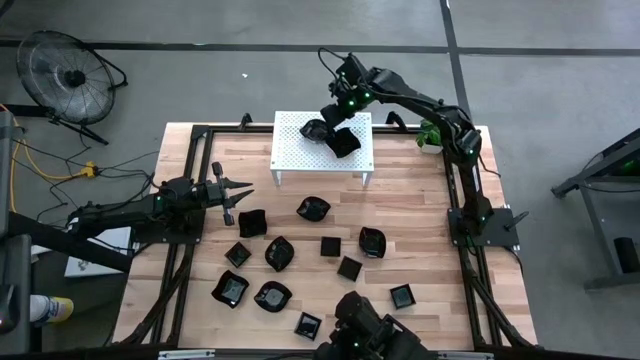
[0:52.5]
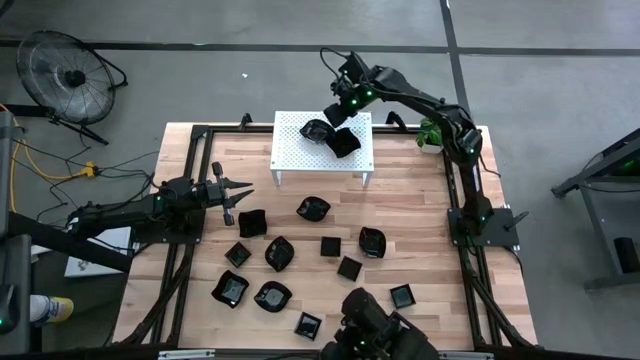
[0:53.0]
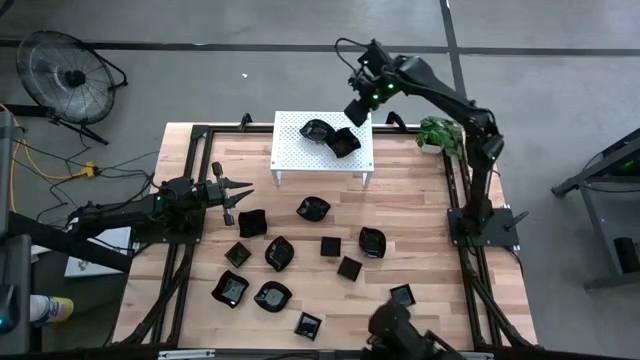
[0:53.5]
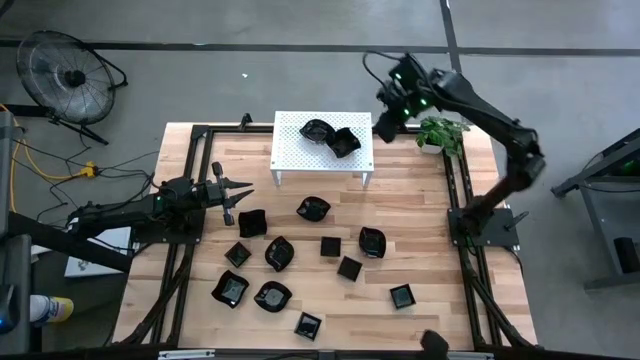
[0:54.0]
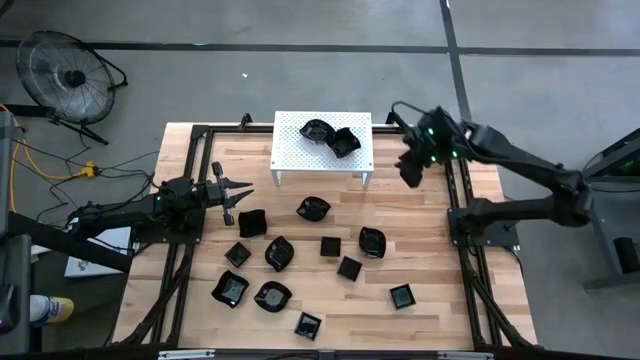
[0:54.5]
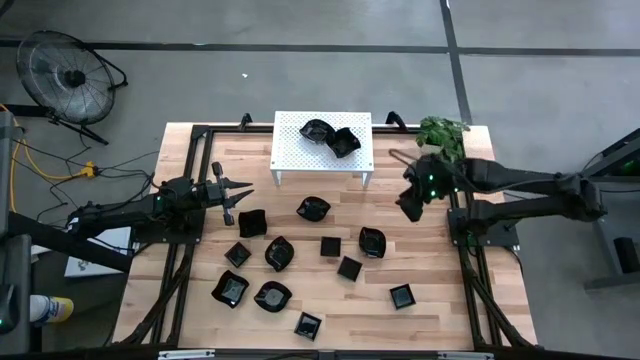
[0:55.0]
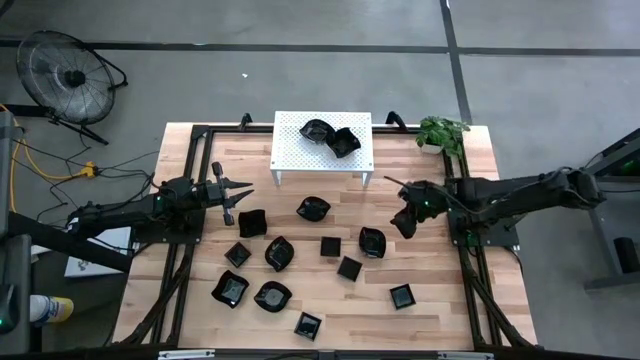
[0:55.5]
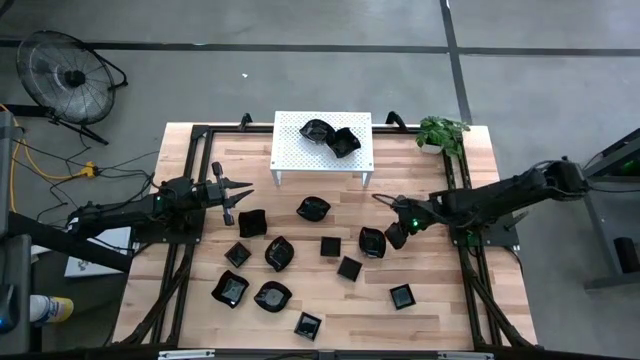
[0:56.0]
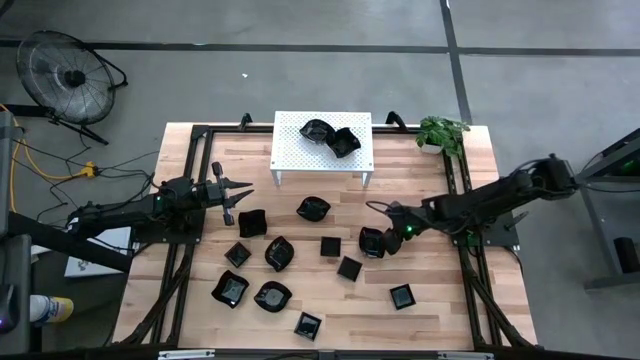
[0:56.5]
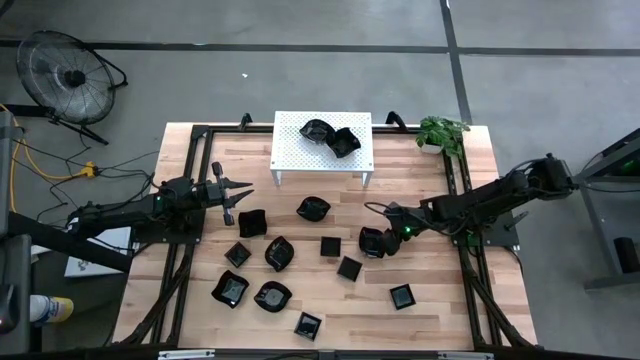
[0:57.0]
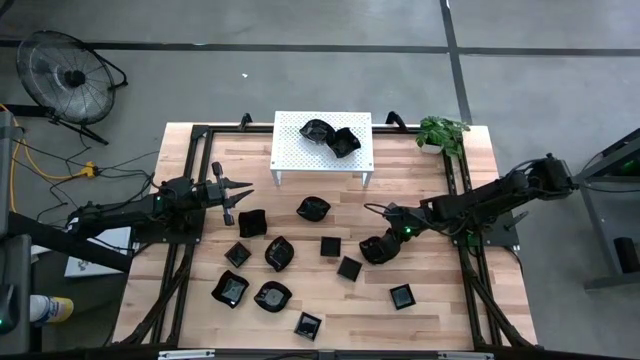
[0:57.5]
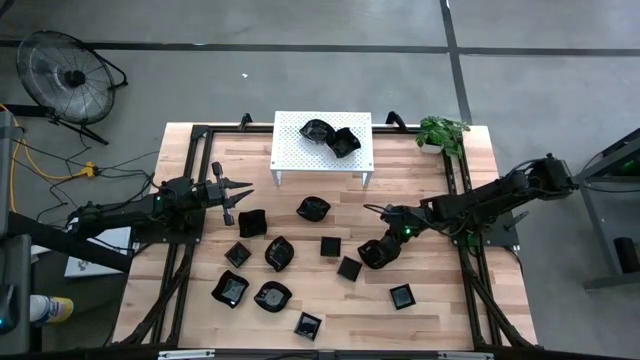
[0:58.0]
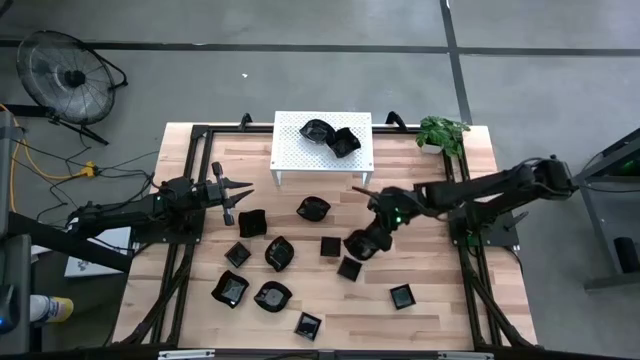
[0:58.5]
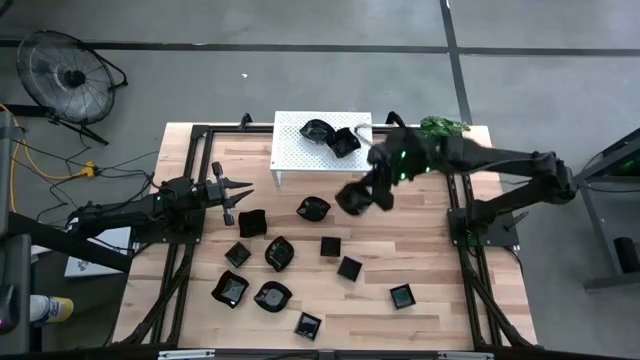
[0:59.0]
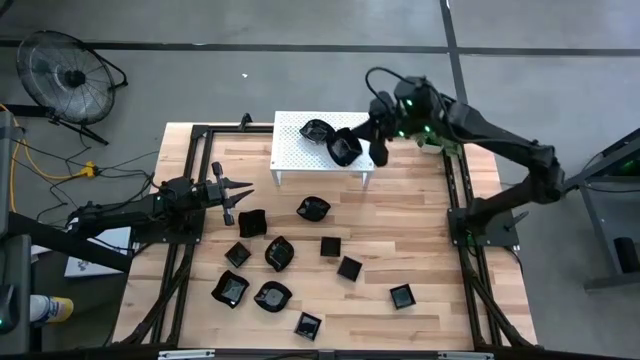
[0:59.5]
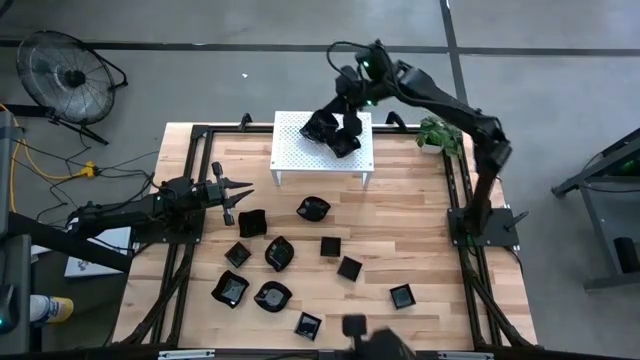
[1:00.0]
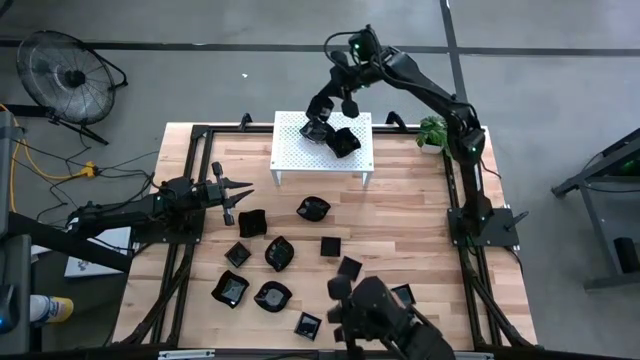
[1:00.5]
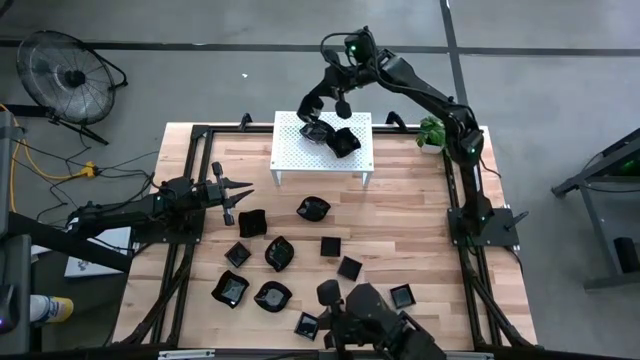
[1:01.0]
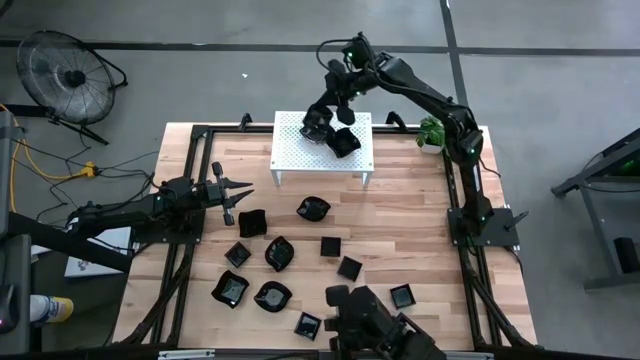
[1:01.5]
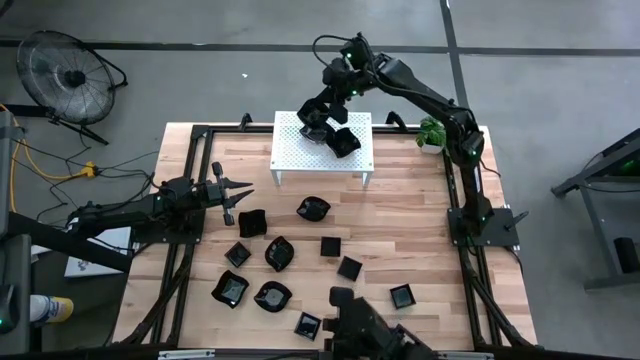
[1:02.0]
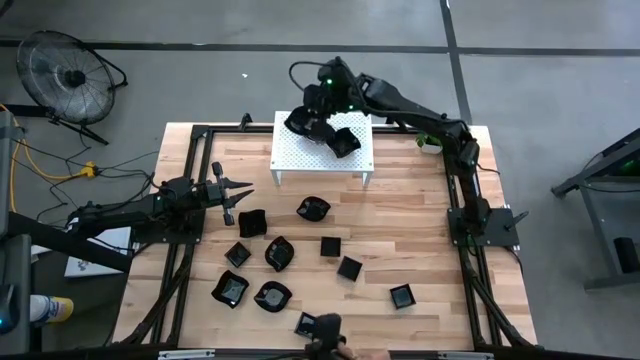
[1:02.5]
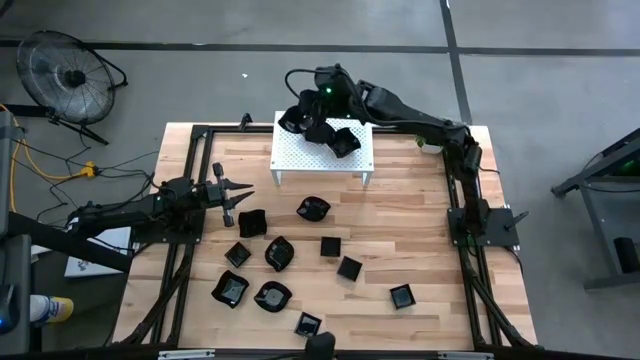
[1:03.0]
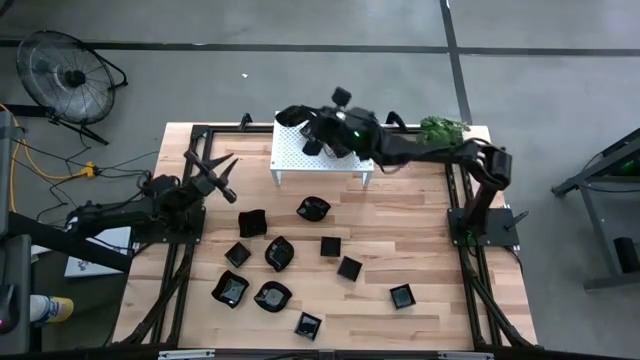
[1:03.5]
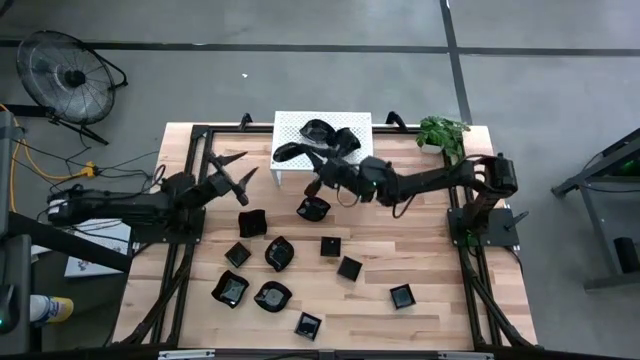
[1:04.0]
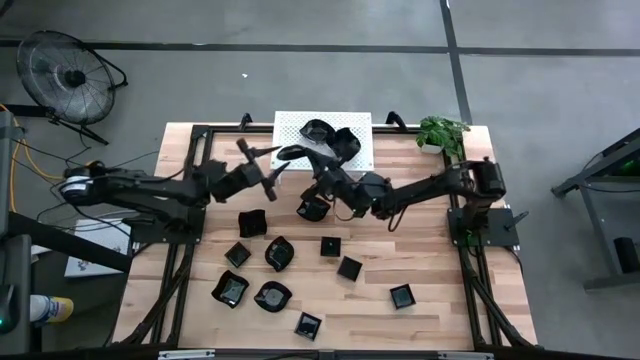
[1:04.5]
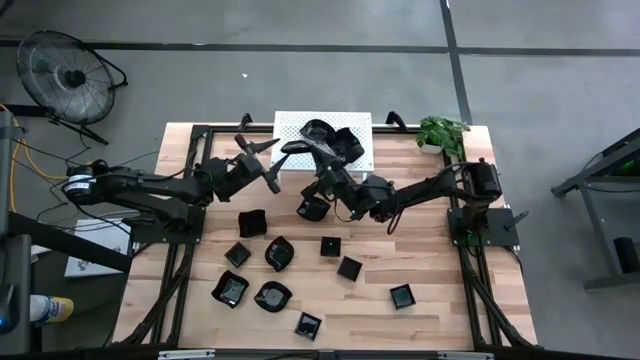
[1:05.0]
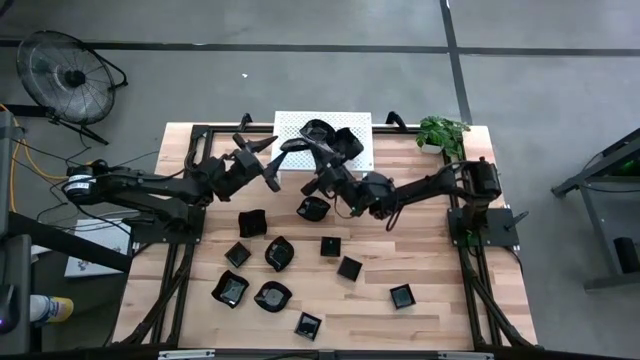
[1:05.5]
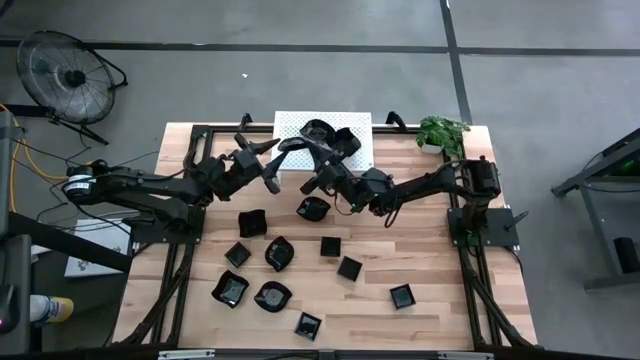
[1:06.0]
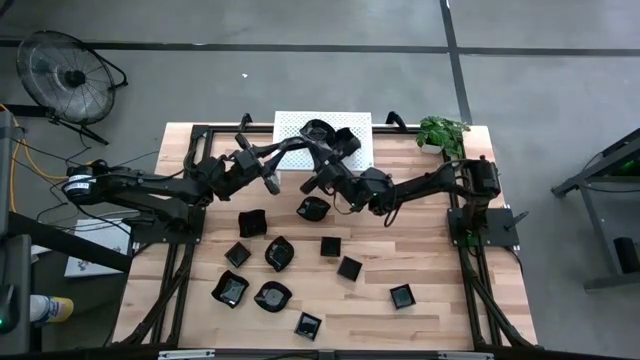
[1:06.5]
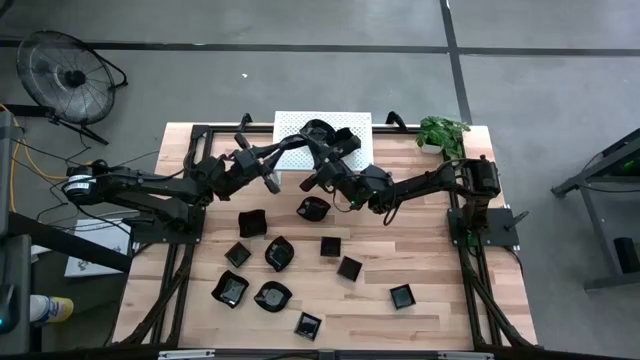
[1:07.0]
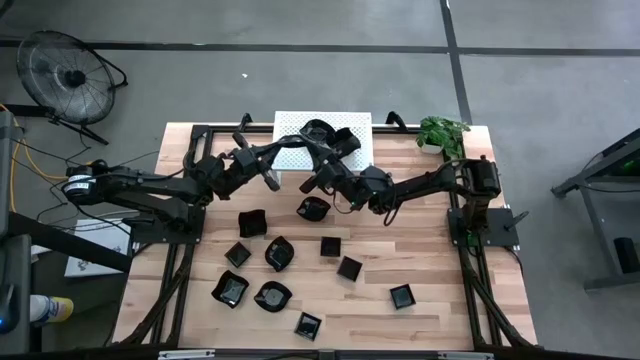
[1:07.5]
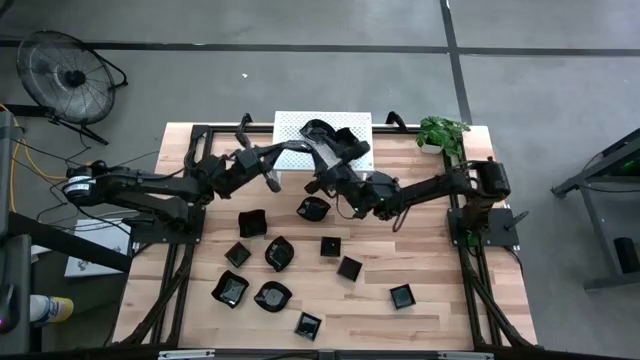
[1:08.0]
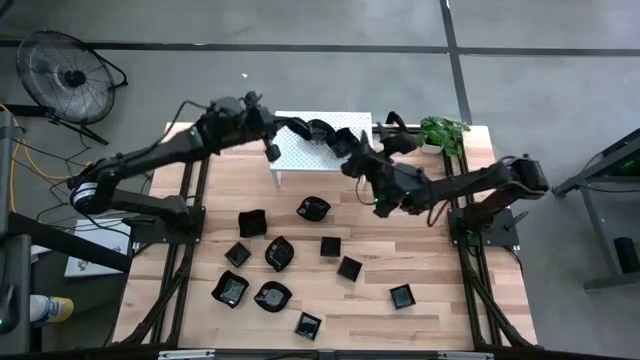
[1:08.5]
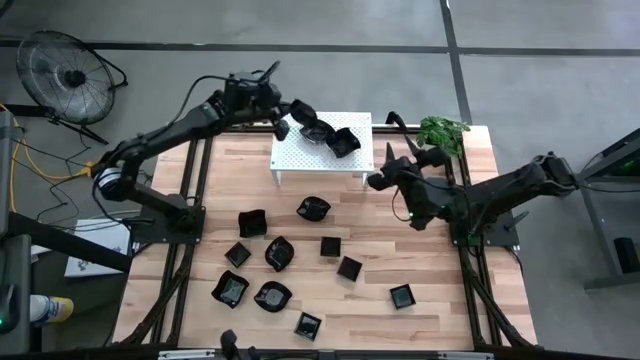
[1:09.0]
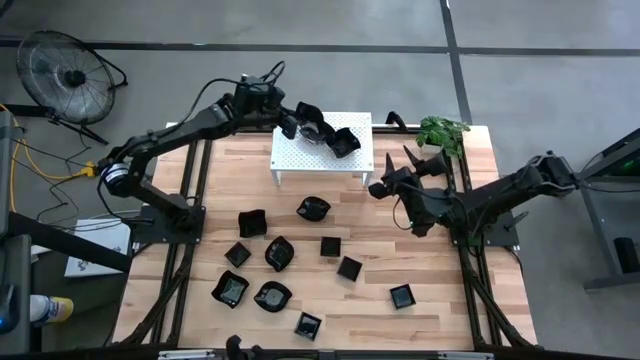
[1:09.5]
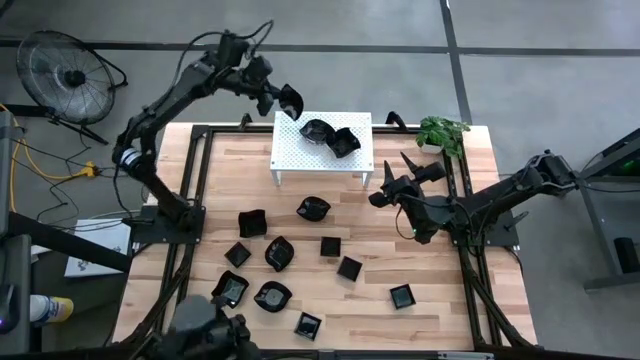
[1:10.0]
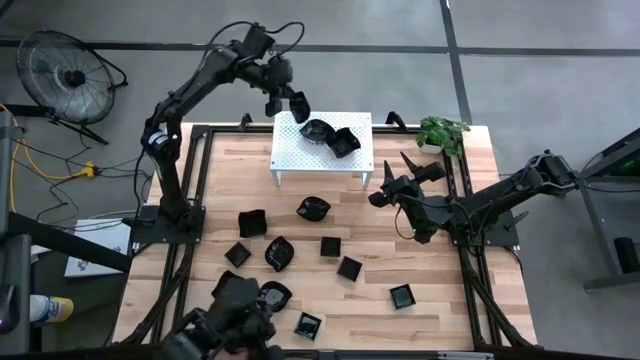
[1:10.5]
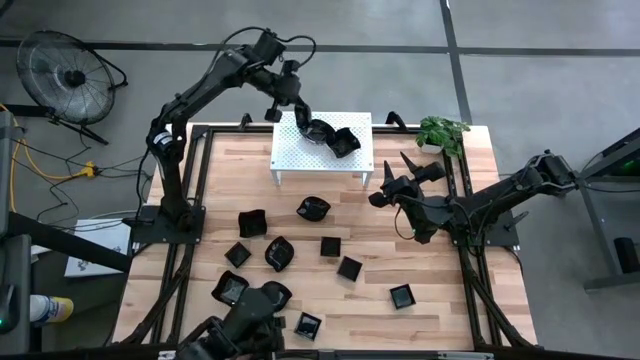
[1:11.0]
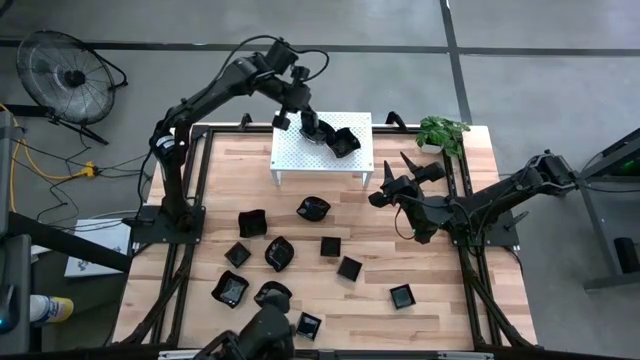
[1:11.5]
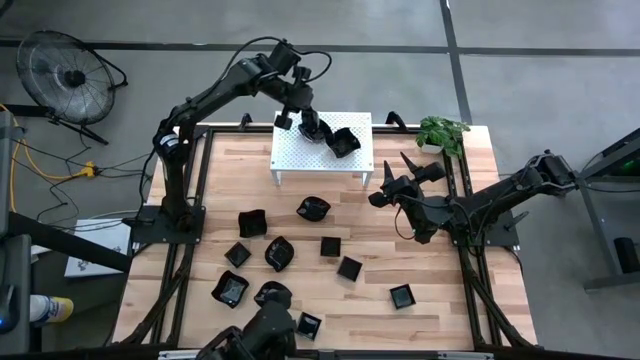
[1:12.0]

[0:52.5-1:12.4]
Task: Pick & Place Mini shaped plates
Stack the black leaf-shaped plate on top of the black leaf-shaped plate on the shelf
